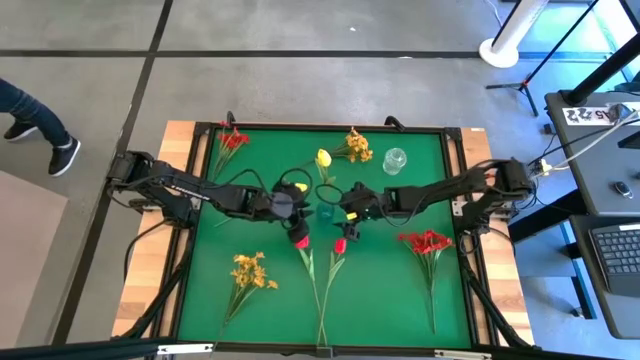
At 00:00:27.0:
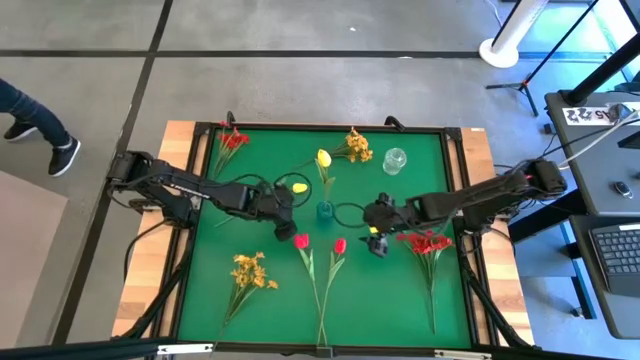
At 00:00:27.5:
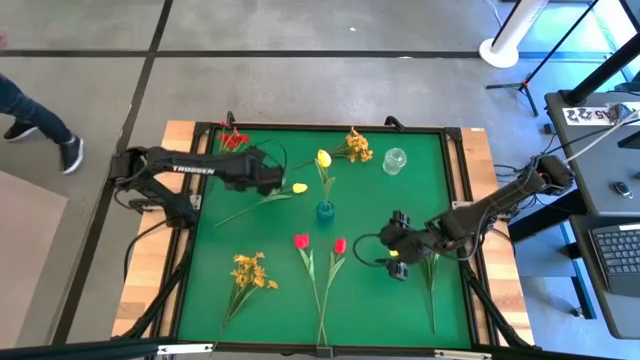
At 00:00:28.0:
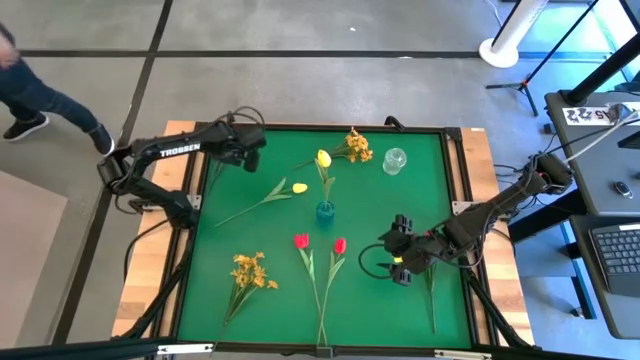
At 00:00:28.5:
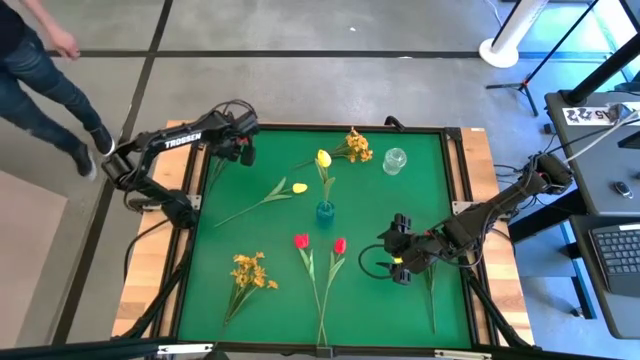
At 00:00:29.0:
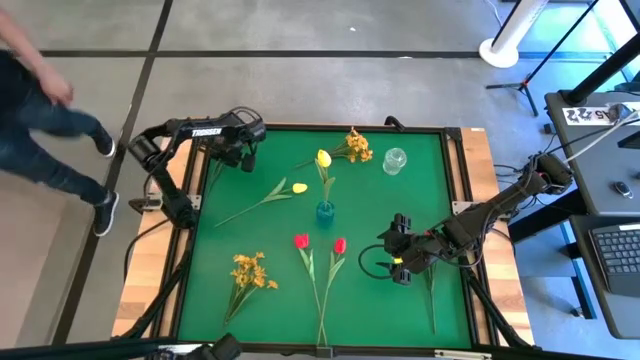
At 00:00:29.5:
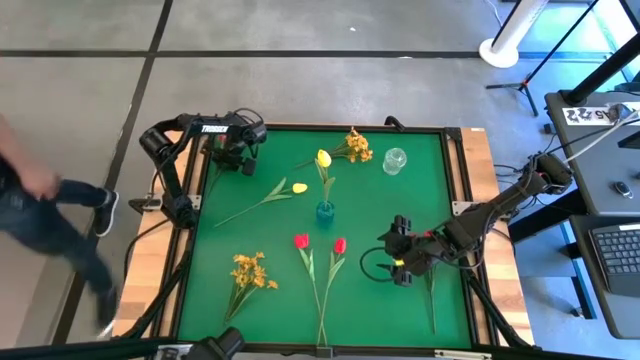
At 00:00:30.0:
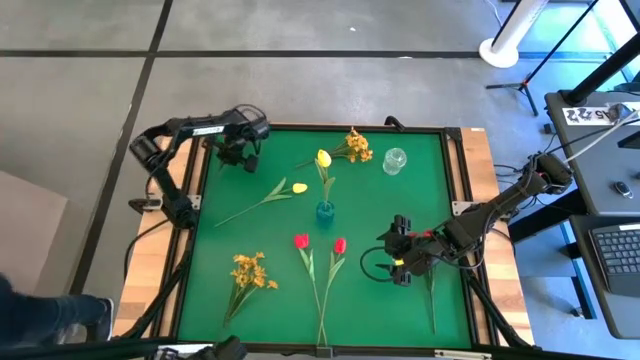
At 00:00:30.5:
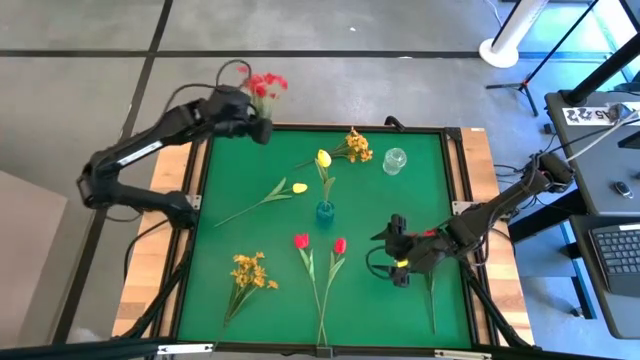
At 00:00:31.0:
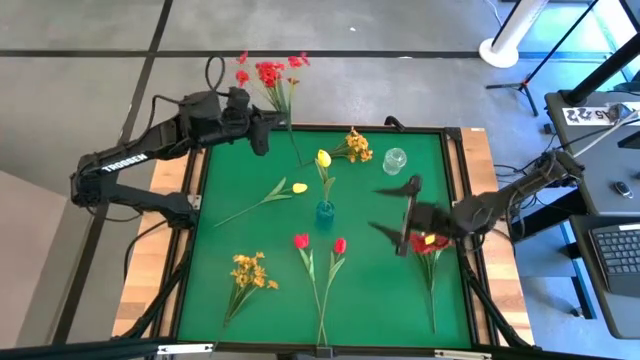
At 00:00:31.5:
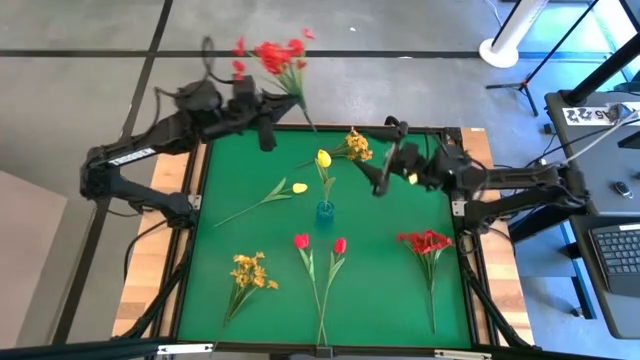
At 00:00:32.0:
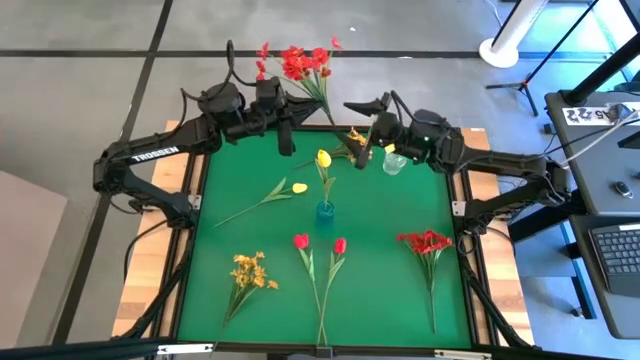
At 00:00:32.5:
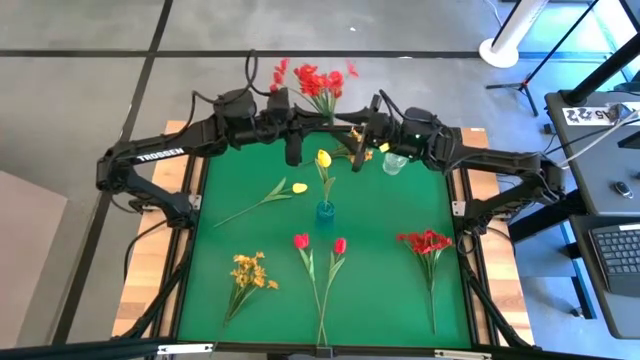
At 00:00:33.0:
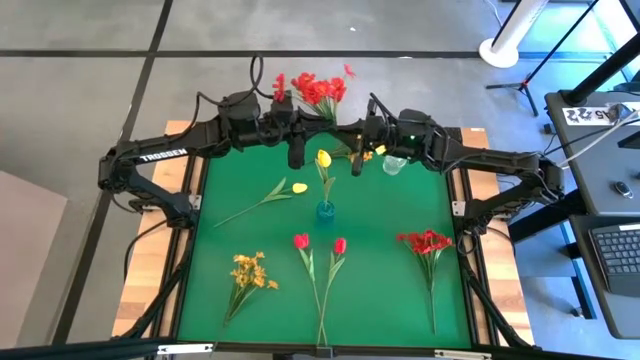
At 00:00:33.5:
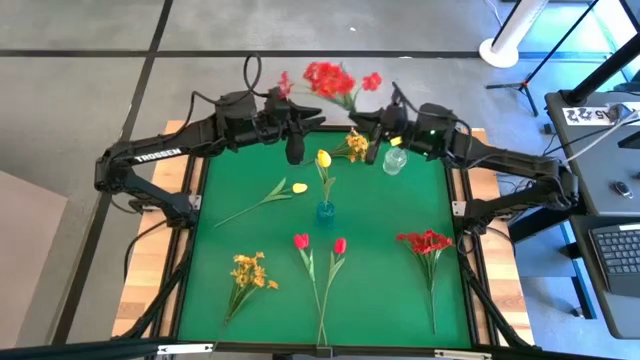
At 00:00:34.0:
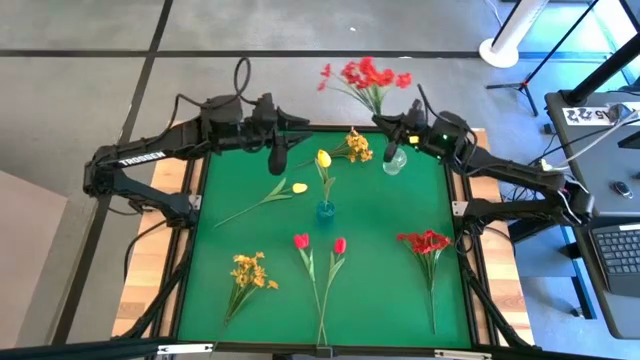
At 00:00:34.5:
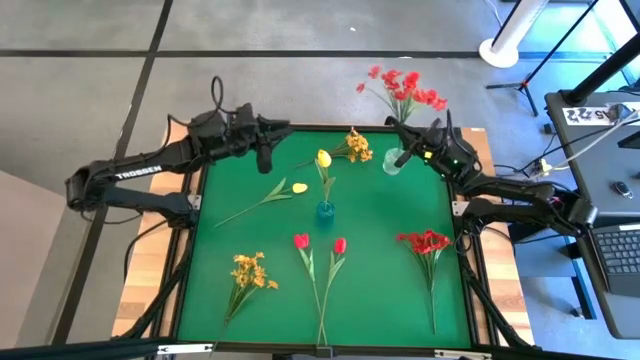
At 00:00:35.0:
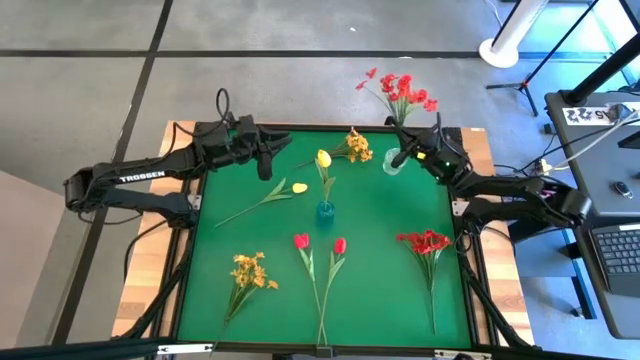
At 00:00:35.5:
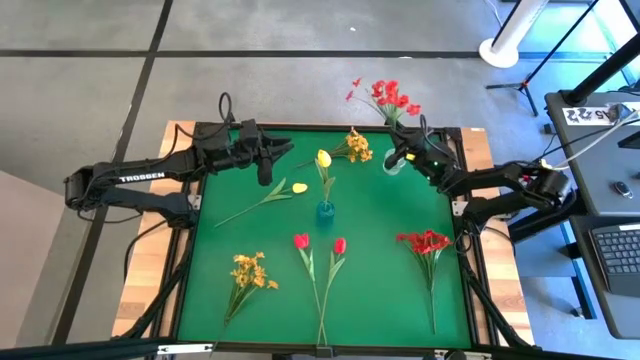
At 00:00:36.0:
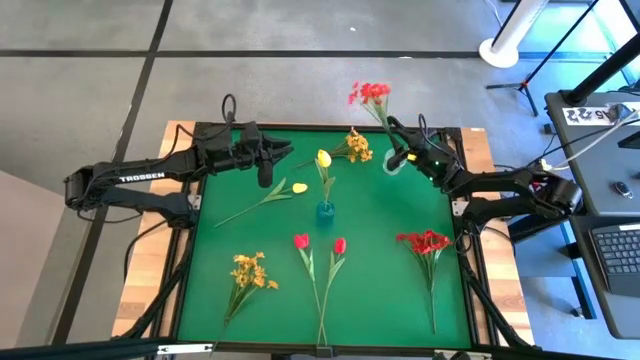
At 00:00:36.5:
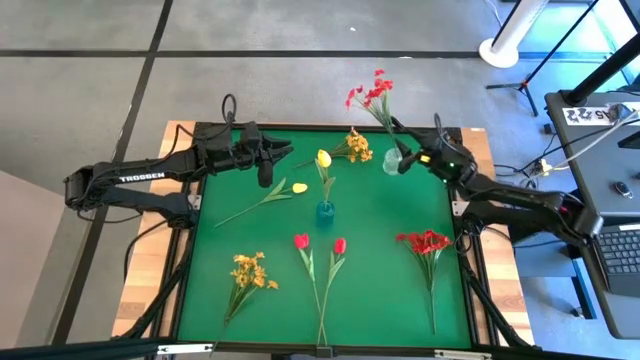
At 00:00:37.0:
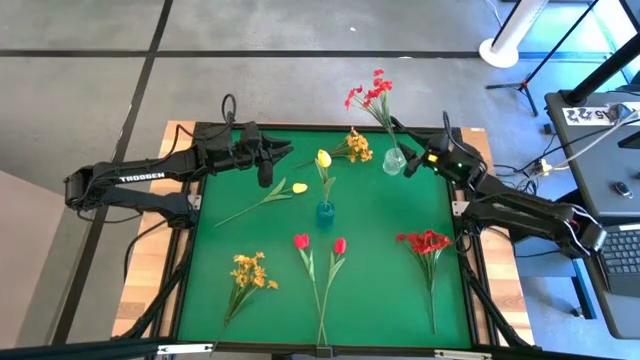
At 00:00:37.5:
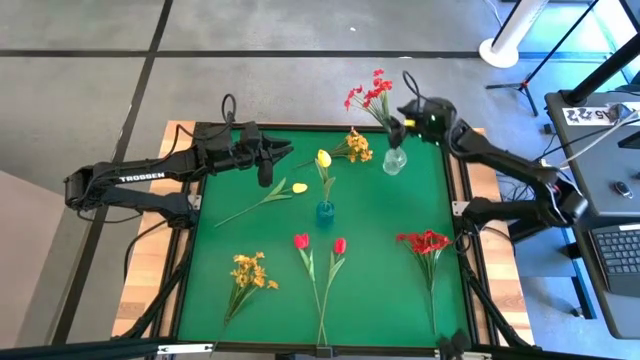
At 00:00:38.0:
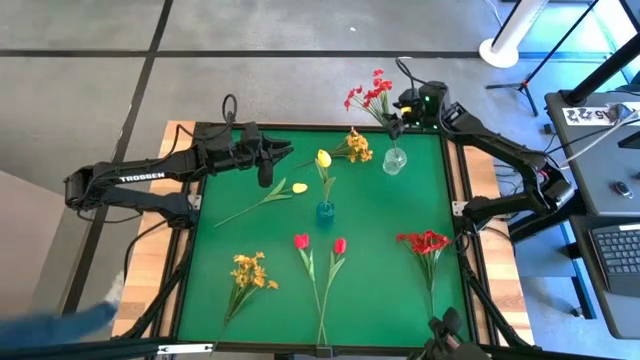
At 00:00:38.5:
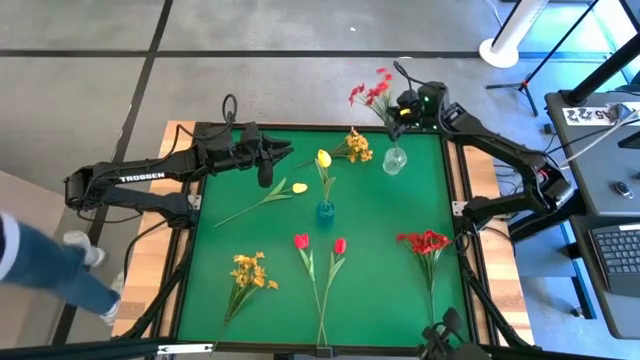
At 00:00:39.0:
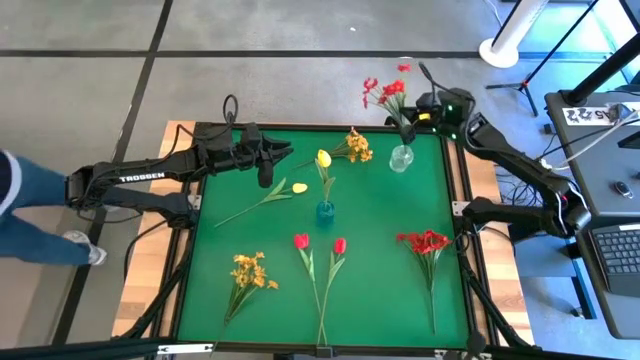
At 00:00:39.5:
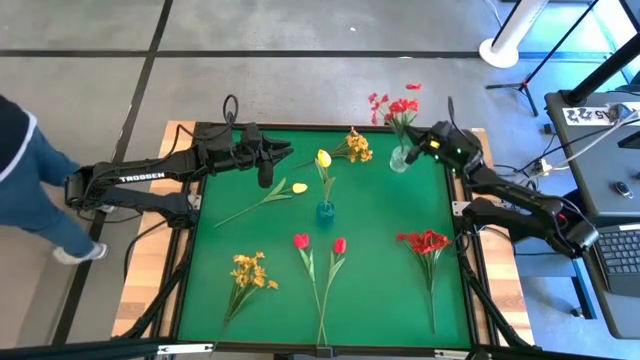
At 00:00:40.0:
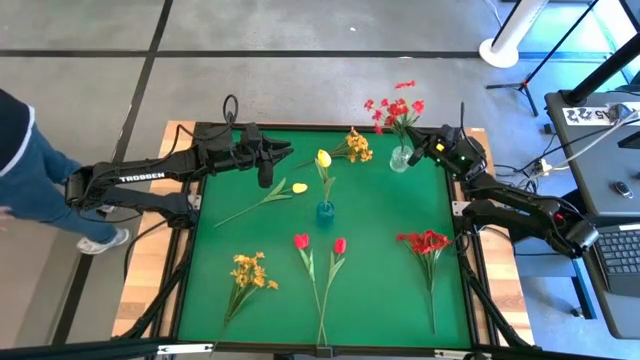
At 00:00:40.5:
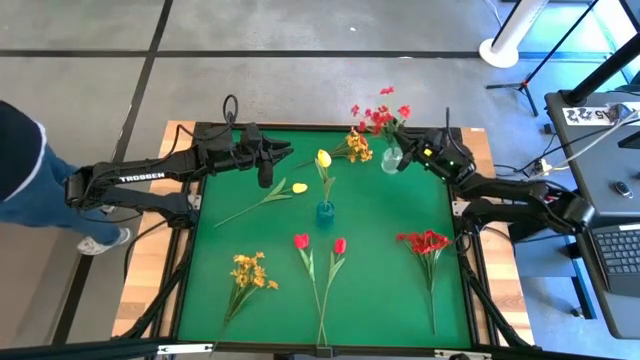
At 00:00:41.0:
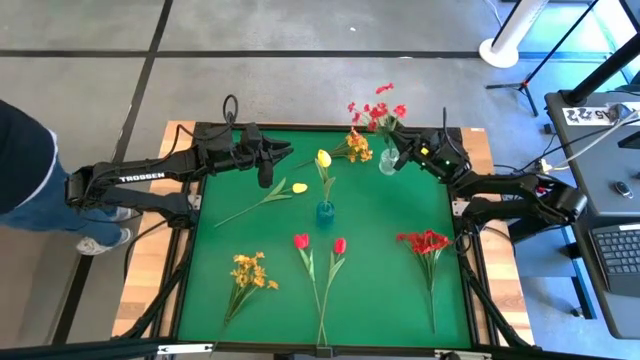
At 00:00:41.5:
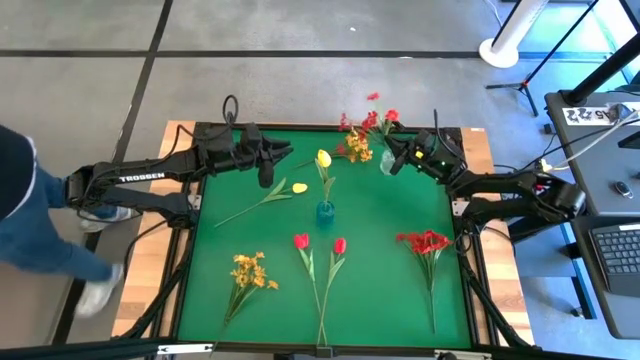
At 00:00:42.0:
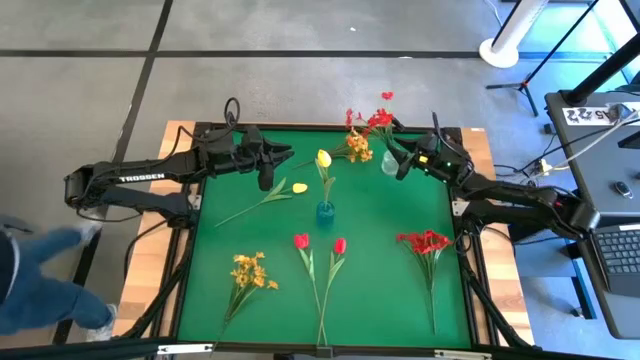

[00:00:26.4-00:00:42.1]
Task: Sort flowers into vase by color
Put the red flower into the transparent vase

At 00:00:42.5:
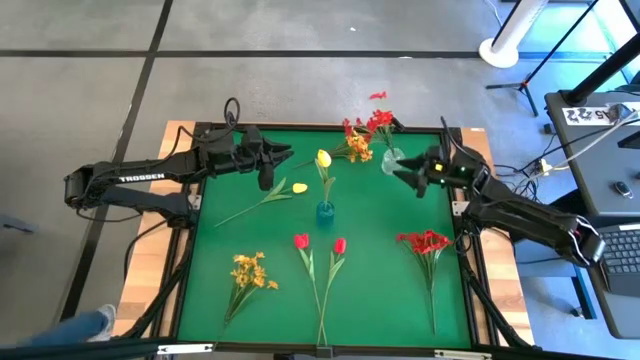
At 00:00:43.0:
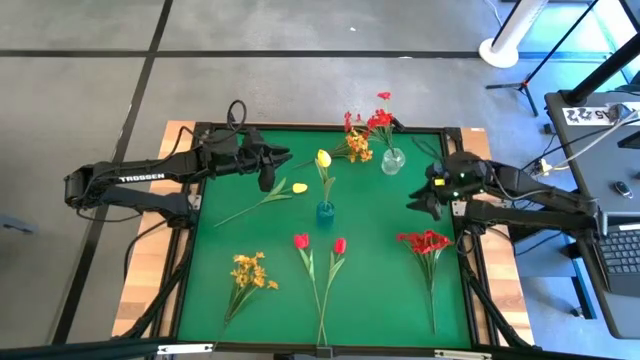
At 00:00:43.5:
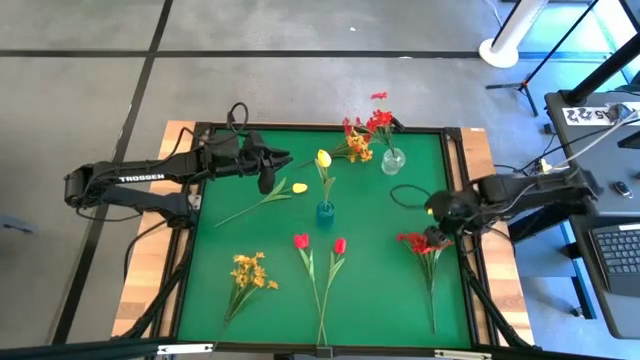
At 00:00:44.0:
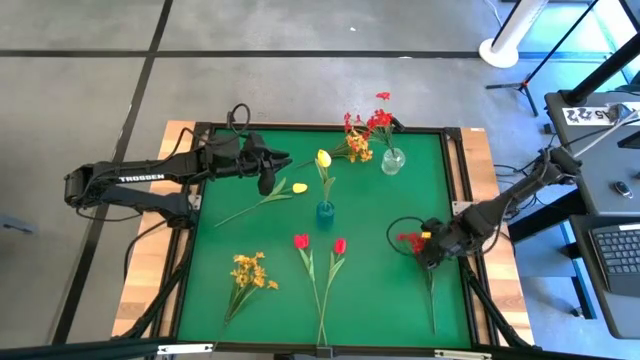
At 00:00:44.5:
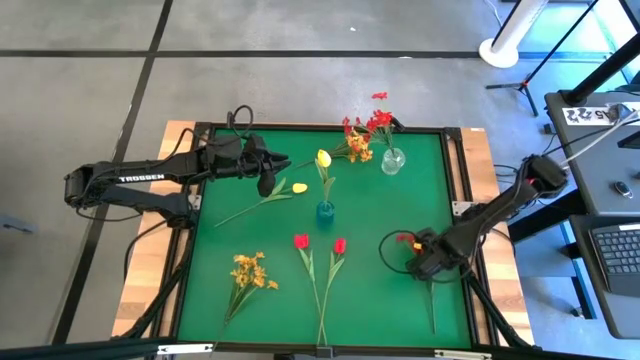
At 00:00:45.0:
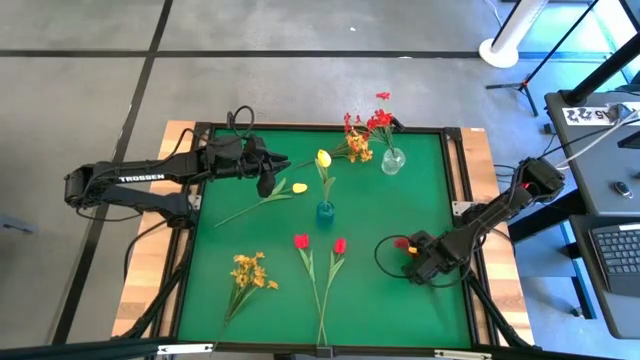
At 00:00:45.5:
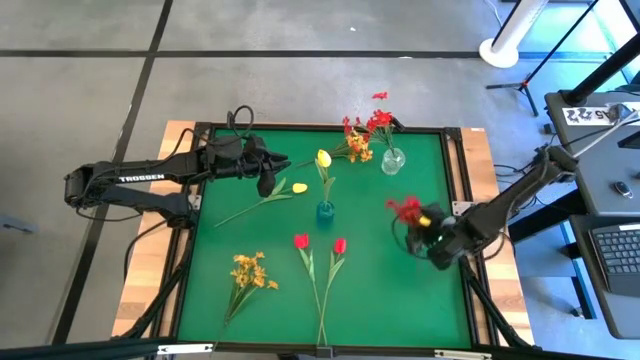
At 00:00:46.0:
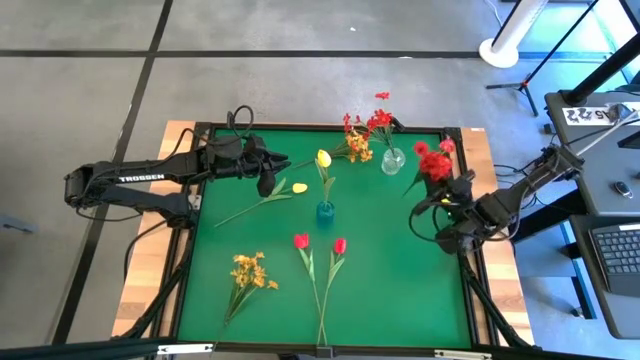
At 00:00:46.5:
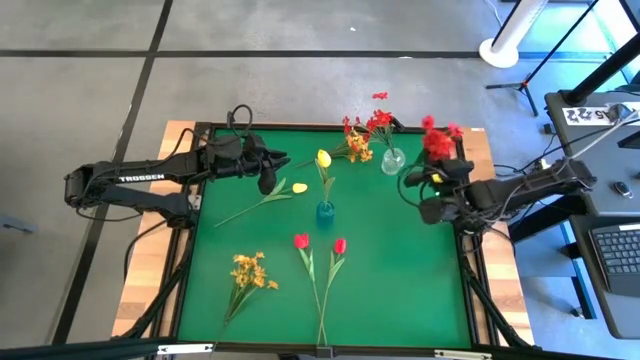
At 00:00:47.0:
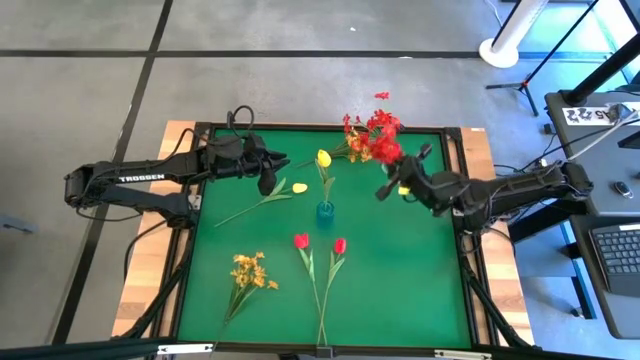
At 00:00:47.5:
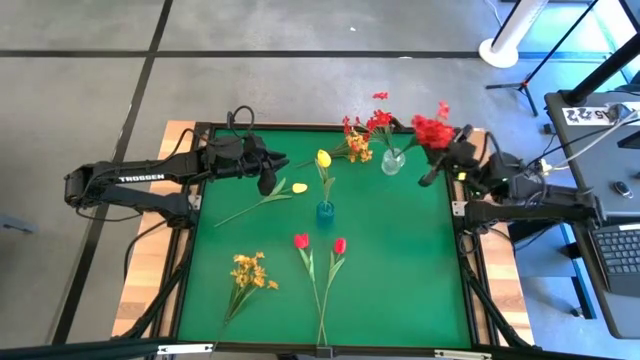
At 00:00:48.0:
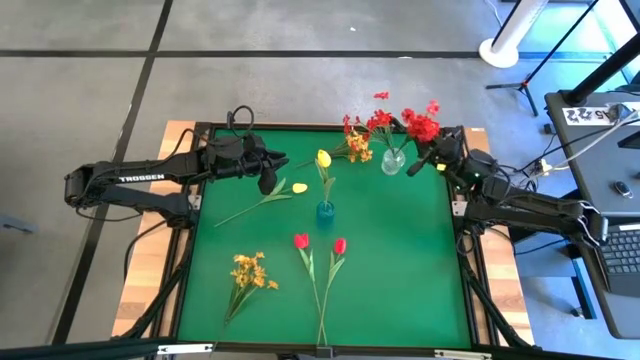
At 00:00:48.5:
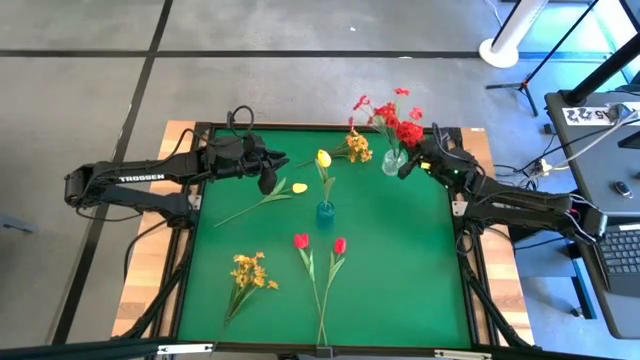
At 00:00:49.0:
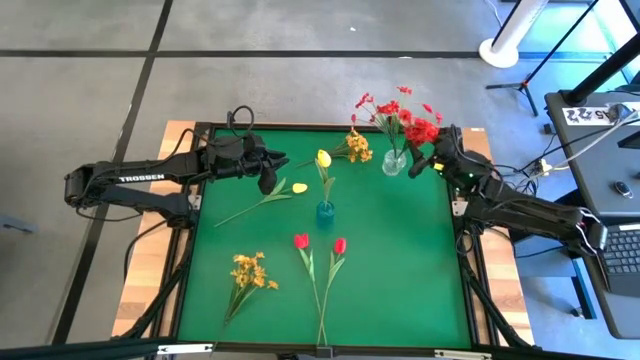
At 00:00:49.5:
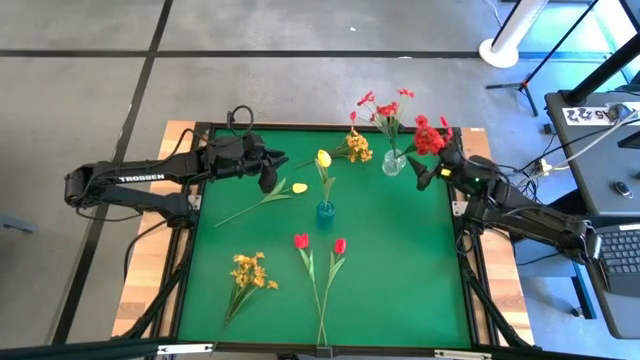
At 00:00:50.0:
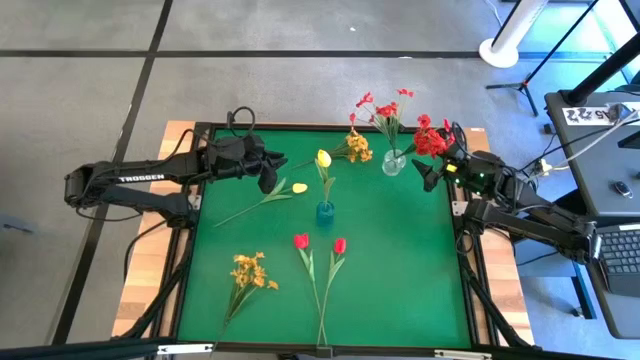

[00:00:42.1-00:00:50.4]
Put the red flower into the transparent vase
